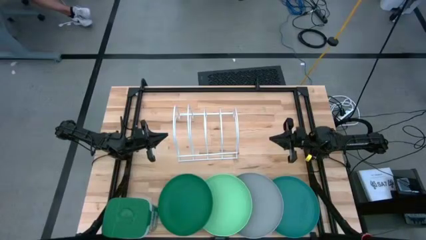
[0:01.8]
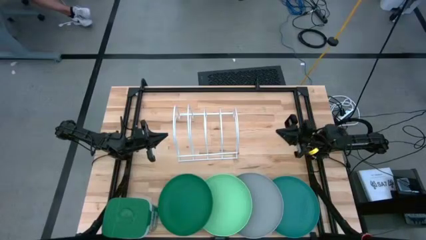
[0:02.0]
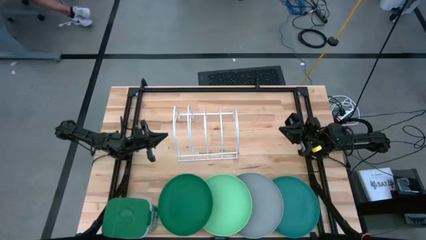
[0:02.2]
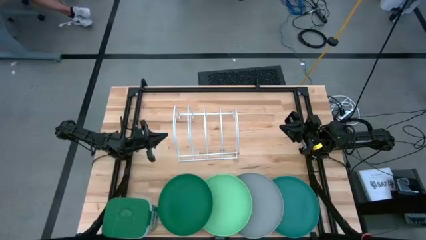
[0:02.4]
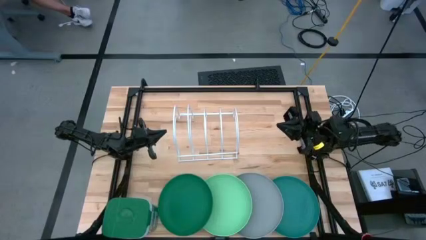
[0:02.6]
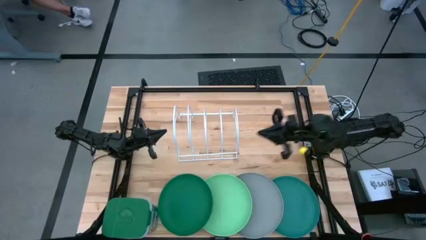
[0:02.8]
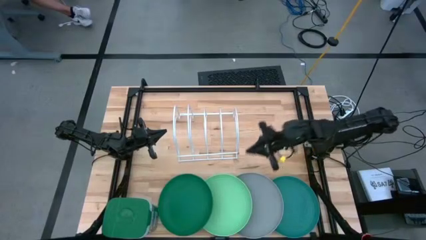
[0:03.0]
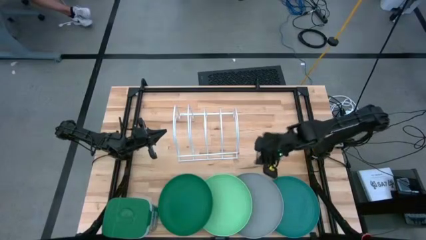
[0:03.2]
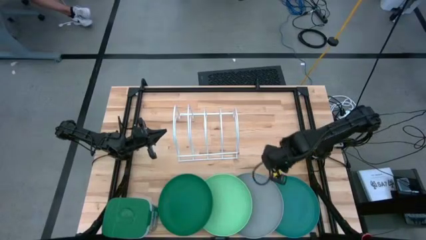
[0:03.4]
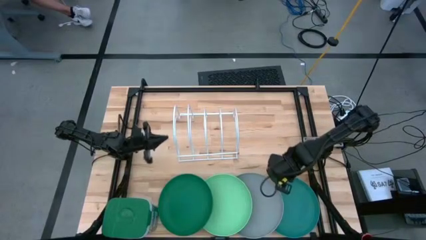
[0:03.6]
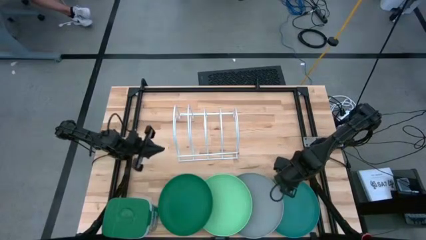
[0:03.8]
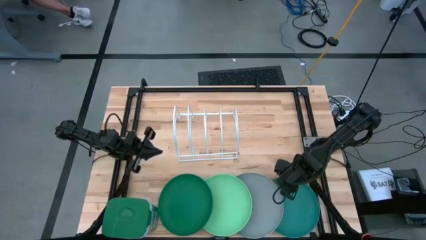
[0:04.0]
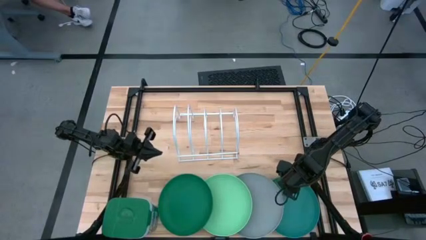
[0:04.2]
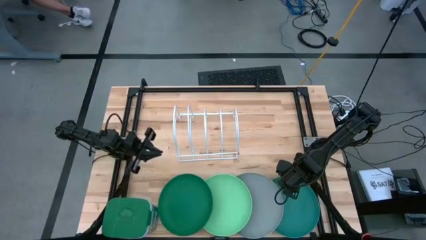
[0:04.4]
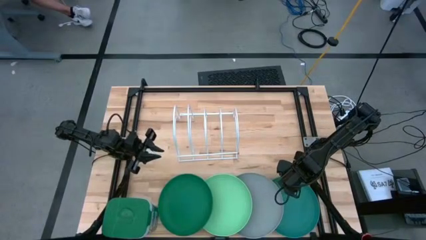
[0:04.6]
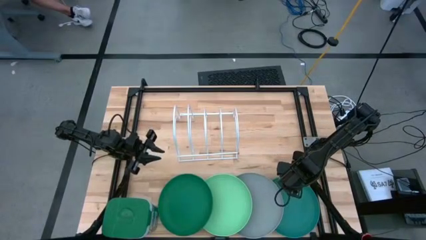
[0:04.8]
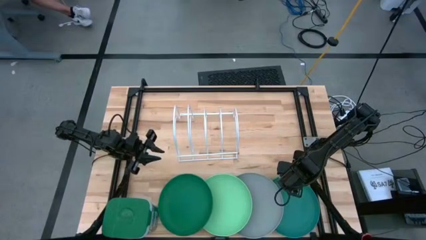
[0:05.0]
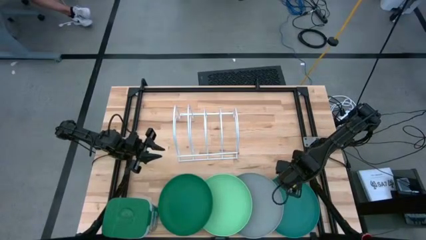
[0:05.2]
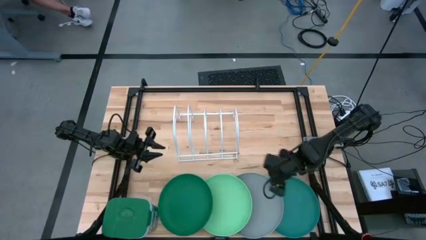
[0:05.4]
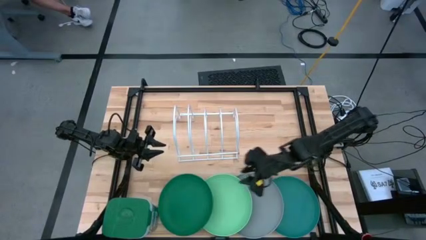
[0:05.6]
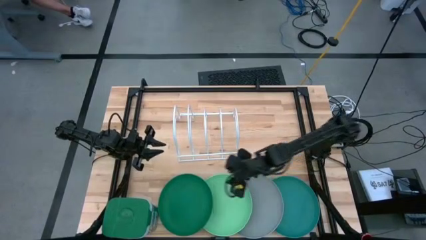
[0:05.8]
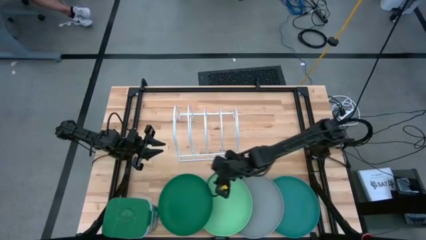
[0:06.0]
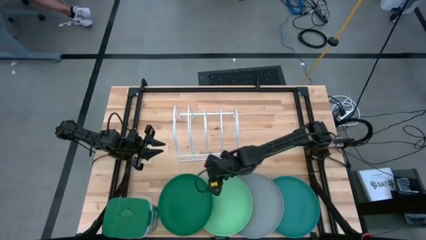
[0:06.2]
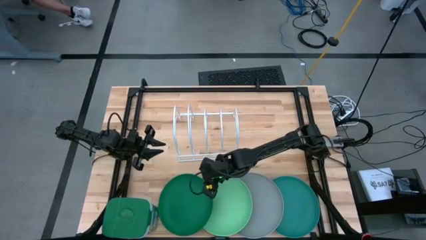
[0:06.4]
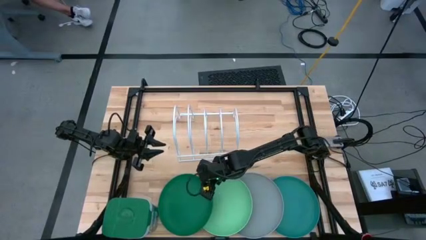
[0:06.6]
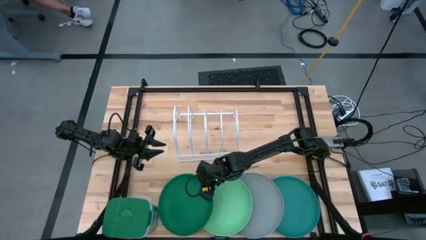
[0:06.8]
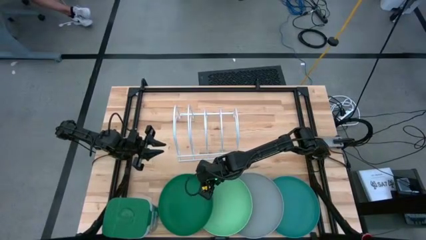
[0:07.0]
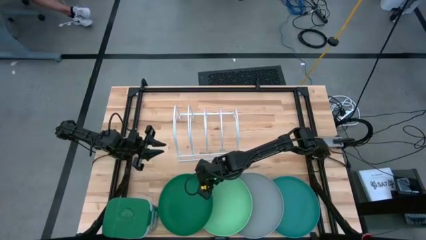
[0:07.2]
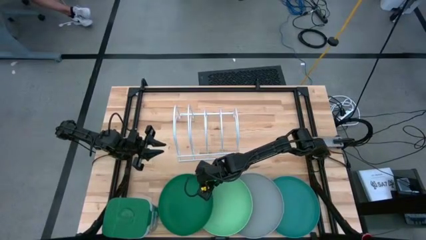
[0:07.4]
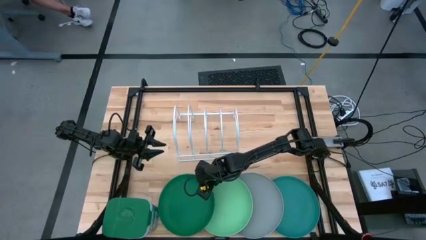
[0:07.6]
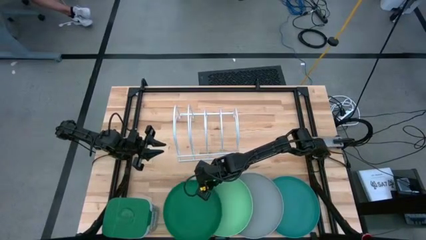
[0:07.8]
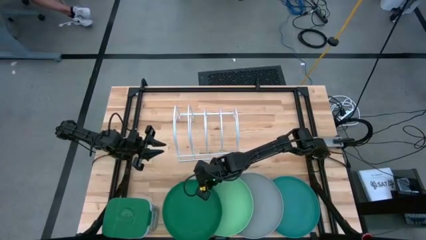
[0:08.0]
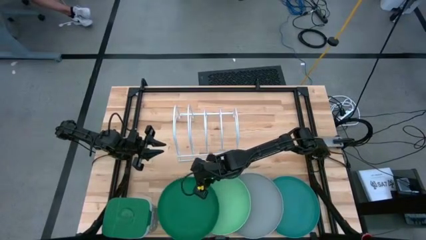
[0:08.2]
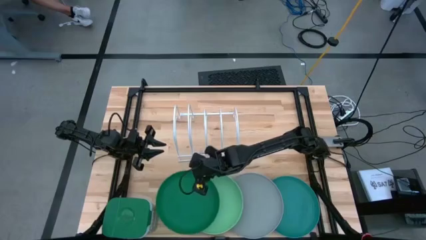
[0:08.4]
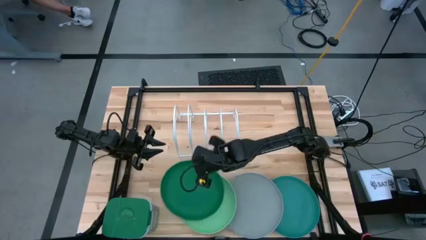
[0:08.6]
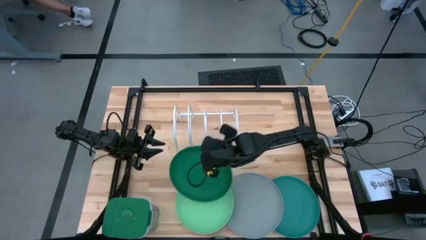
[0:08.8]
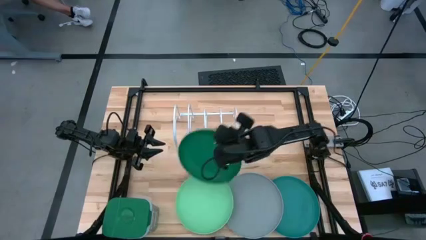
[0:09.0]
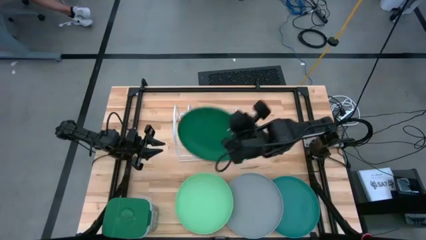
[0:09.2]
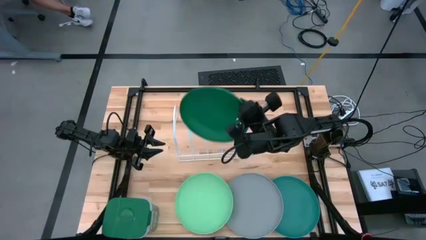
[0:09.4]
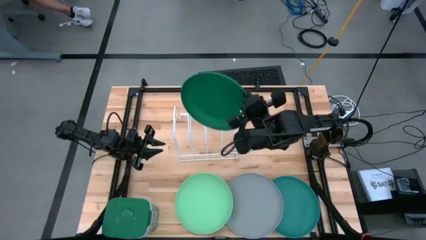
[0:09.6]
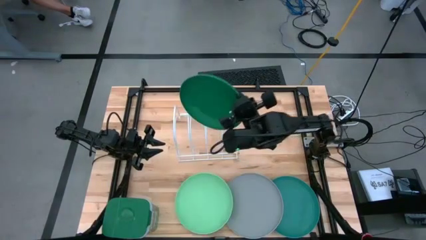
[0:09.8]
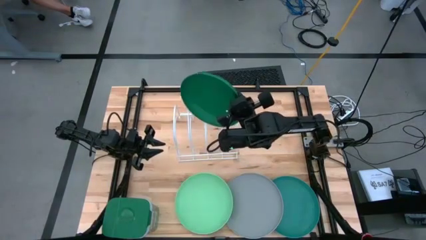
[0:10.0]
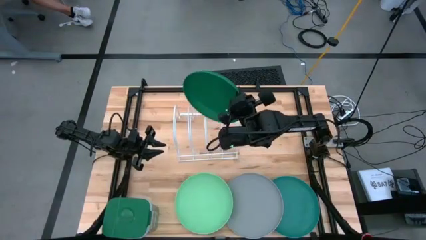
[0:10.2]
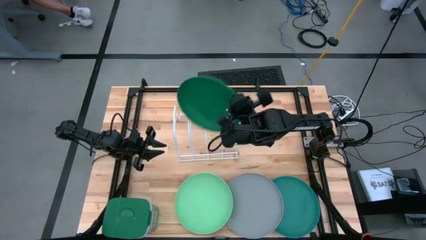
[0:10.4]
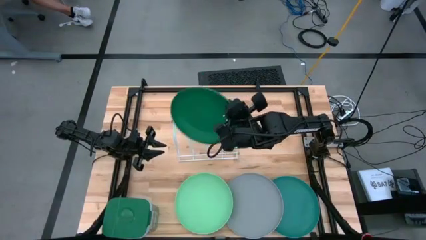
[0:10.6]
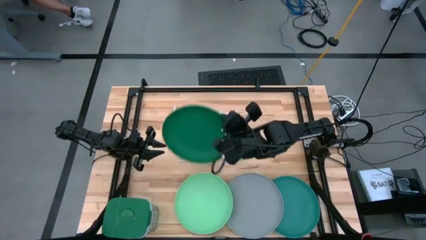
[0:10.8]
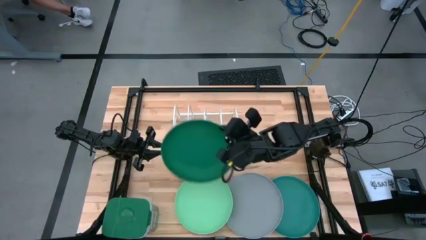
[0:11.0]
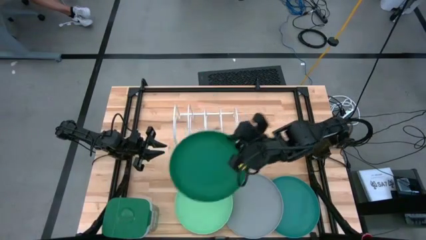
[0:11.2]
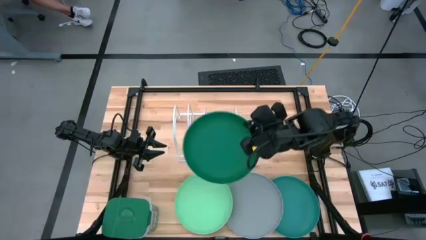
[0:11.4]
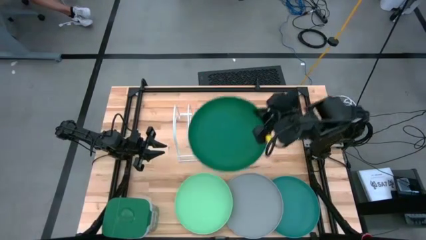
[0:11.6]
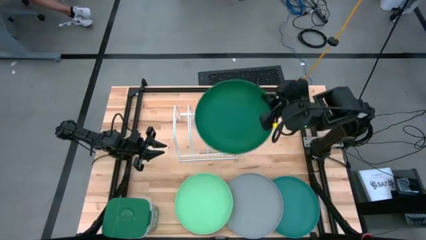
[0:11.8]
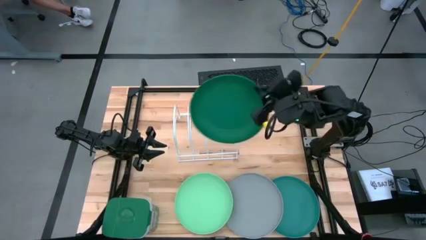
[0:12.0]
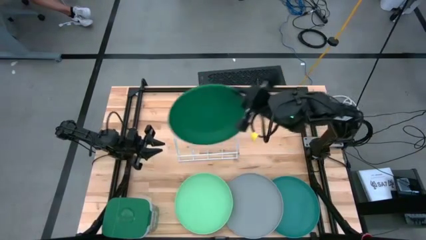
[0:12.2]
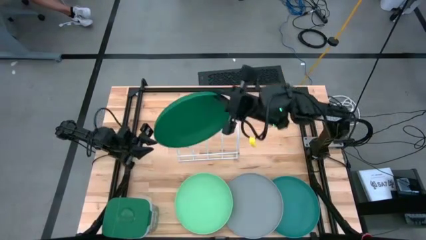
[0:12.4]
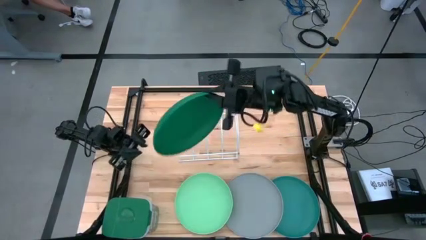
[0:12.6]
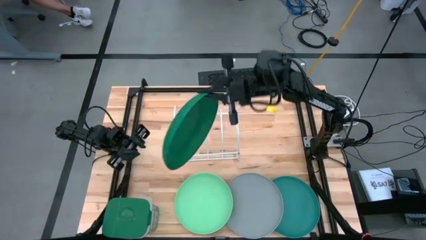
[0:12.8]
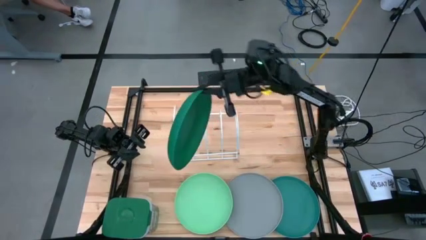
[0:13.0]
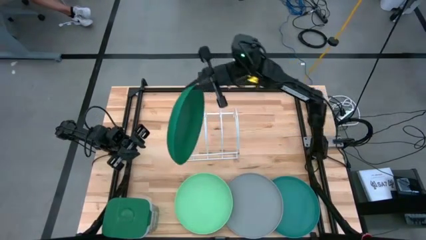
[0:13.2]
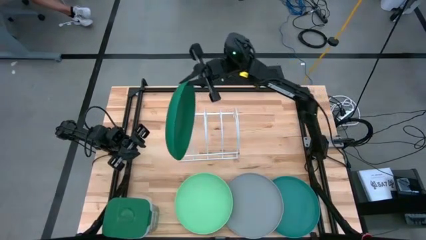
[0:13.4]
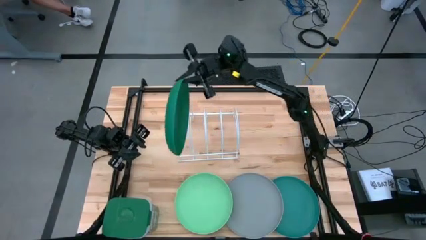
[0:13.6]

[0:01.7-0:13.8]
Task: Sort dishes
Put the green plate into the white dish rack
